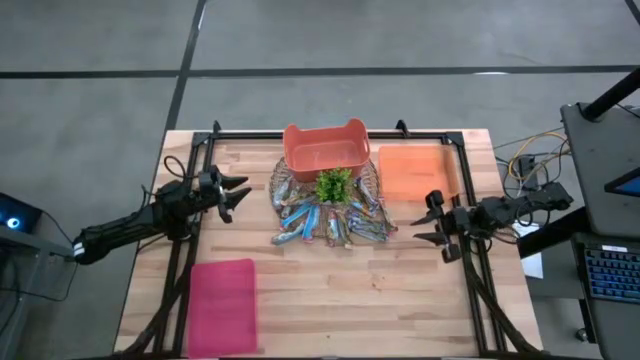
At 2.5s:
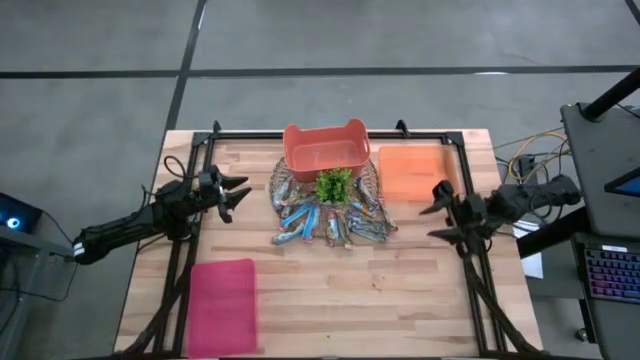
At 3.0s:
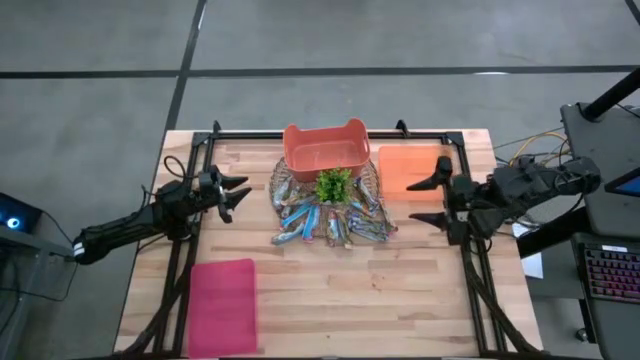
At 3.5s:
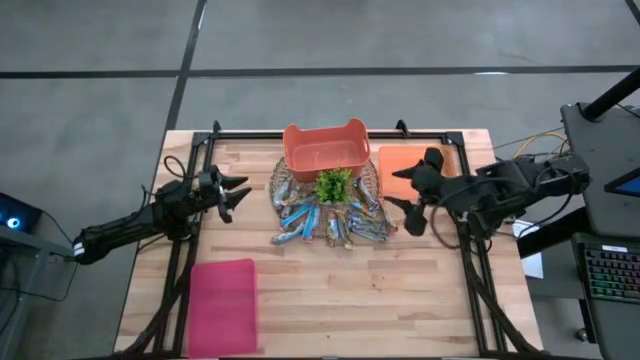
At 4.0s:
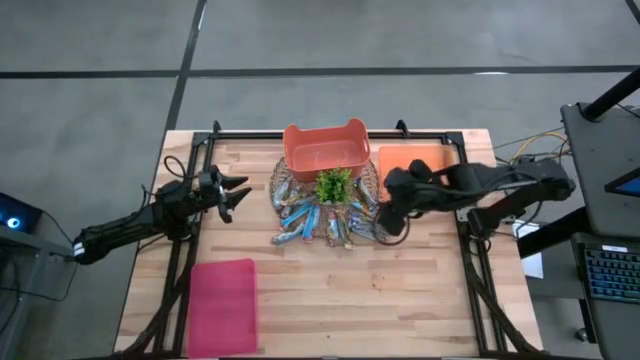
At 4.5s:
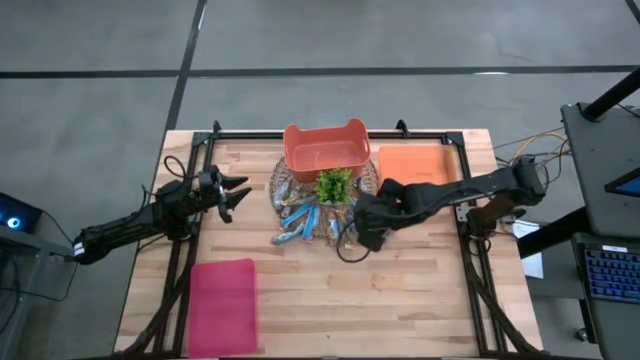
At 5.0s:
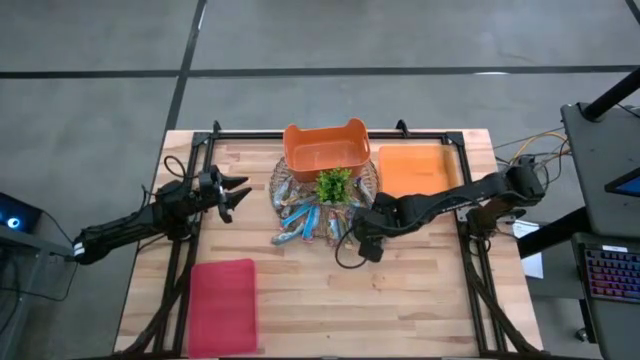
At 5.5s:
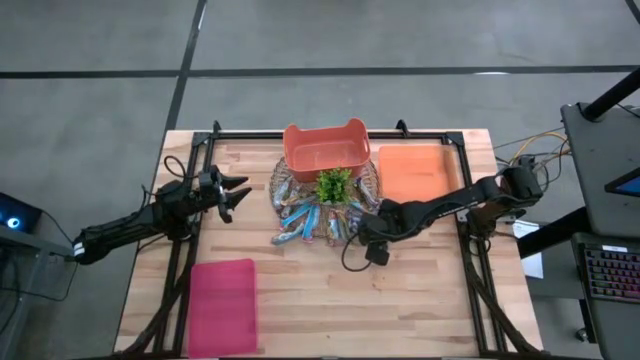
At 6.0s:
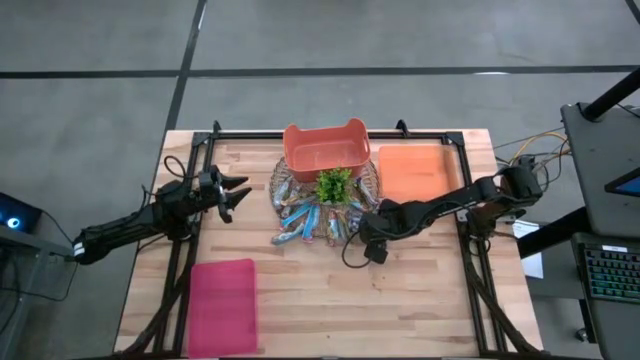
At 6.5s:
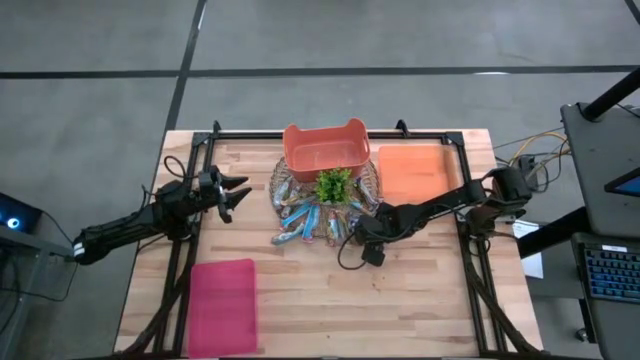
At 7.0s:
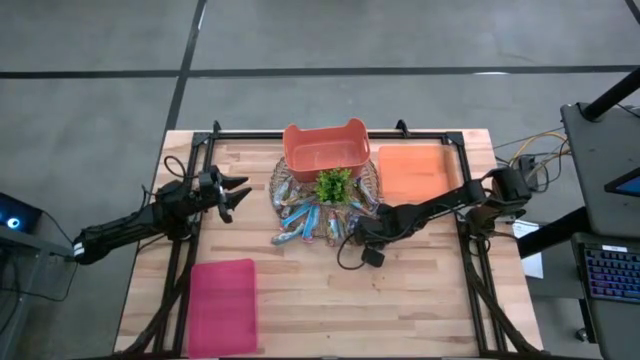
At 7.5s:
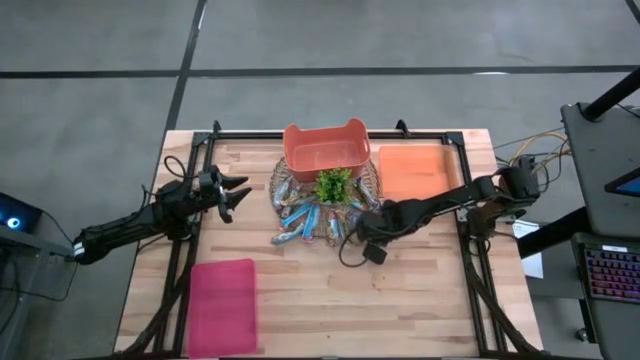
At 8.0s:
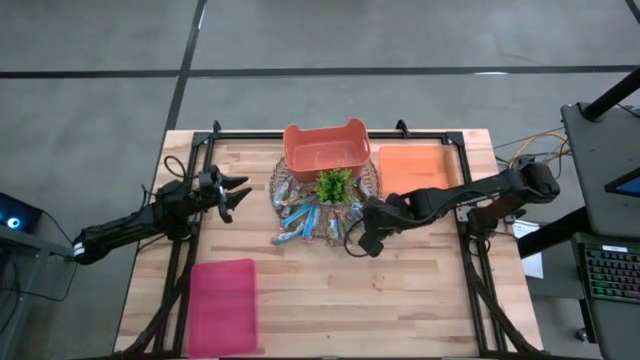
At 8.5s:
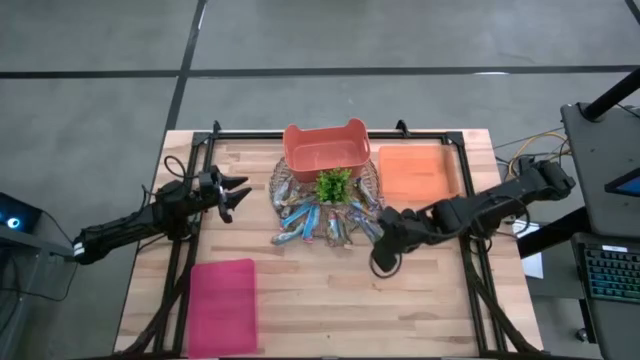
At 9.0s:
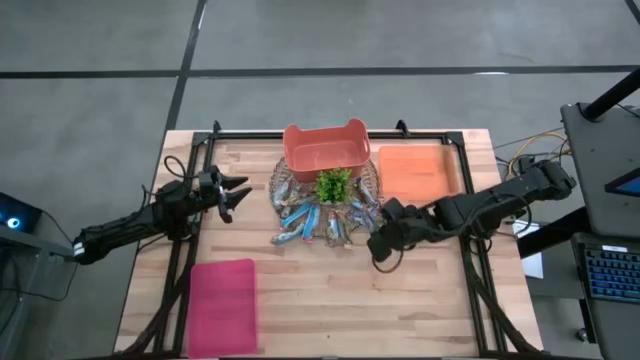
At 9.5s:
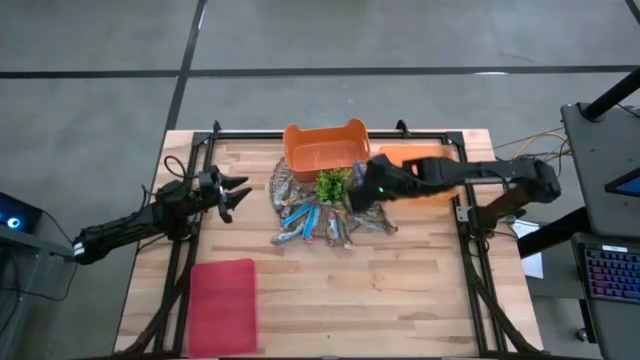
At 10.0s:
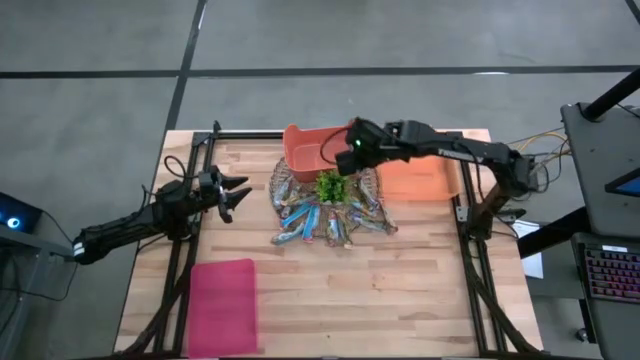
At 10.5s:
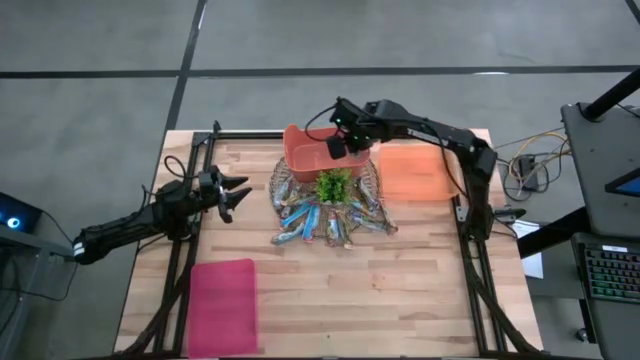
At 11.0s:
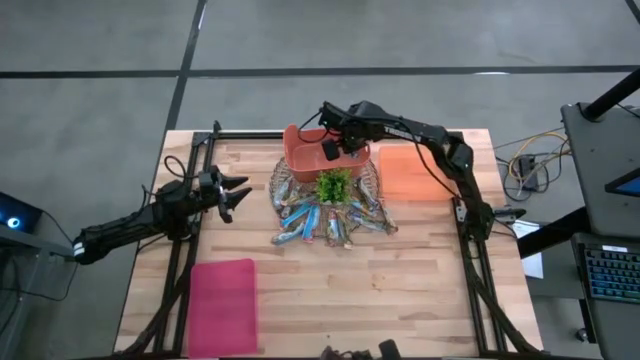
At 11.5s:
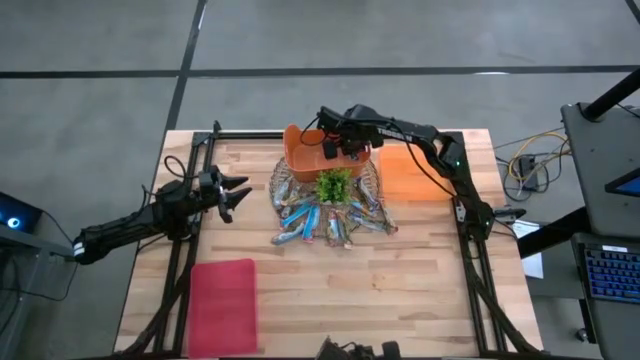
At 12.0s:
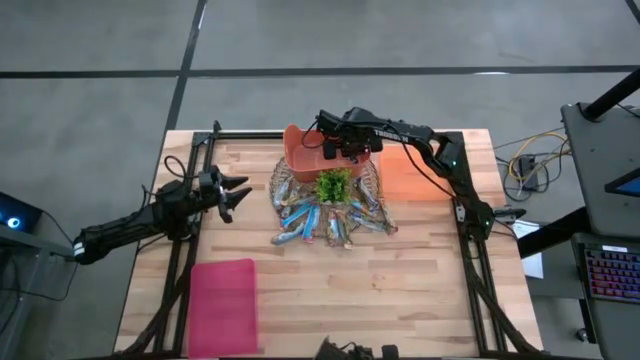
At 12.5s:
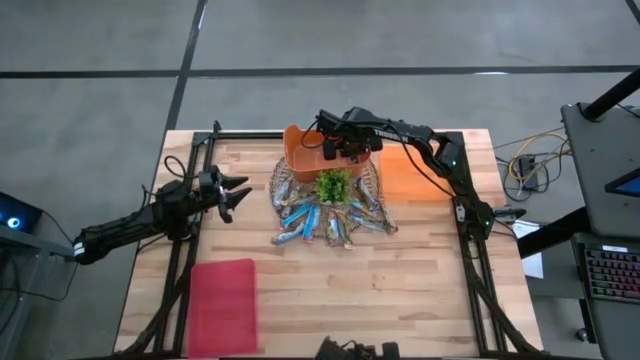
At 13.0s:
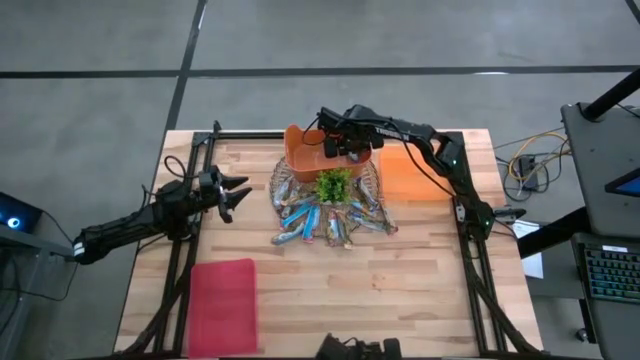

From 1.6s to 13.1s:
Task: Pick and place Granola Bars by type
Put the blue granola bar into the dark orange bin

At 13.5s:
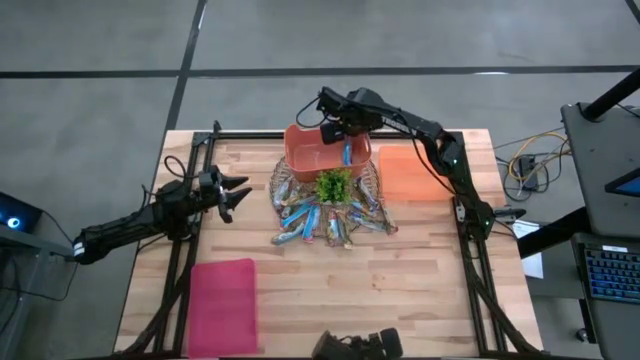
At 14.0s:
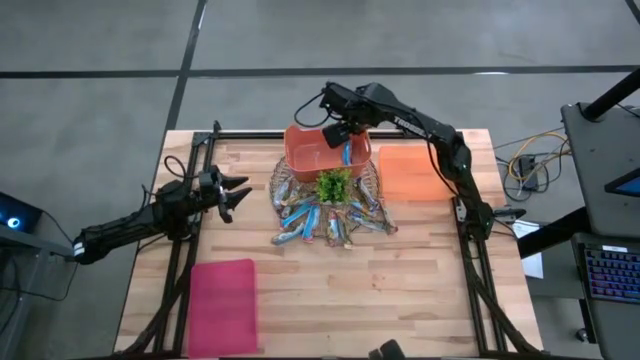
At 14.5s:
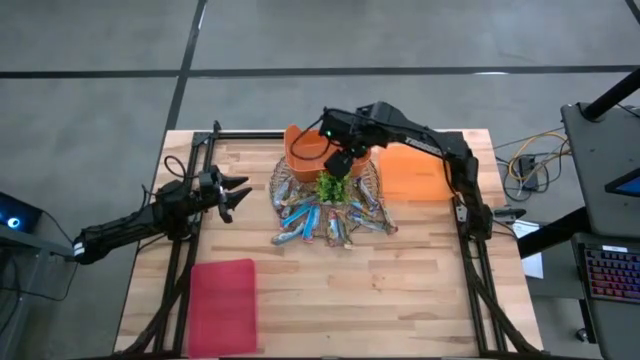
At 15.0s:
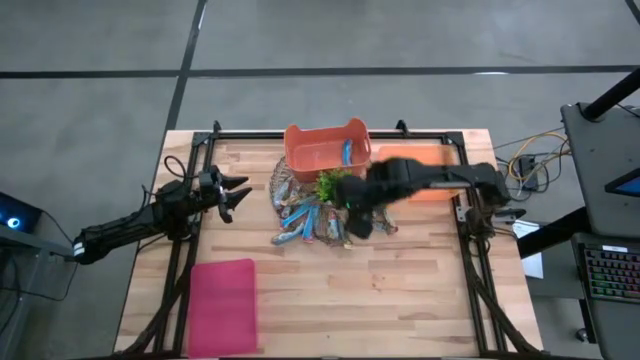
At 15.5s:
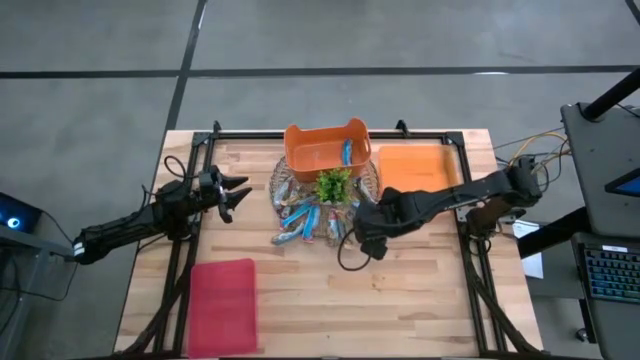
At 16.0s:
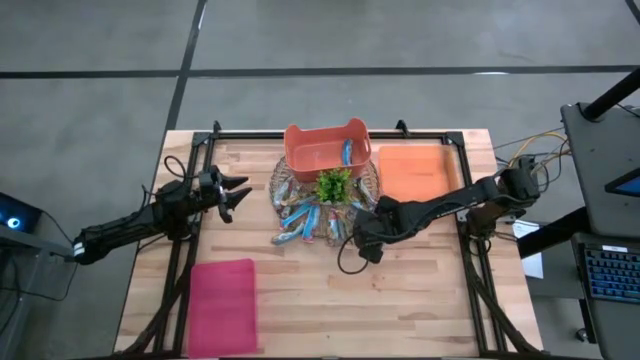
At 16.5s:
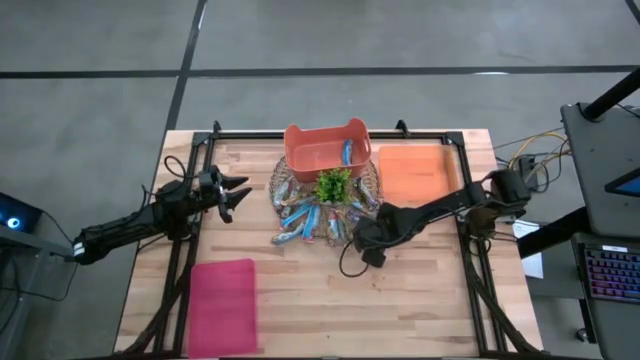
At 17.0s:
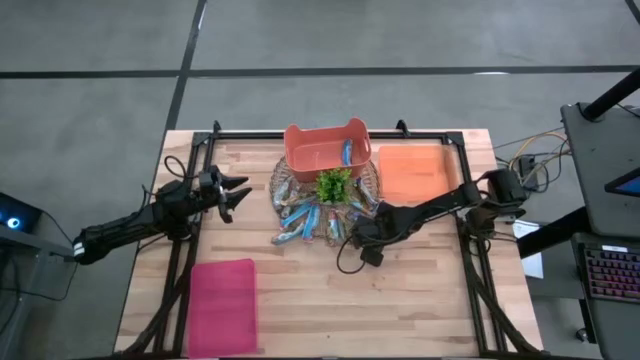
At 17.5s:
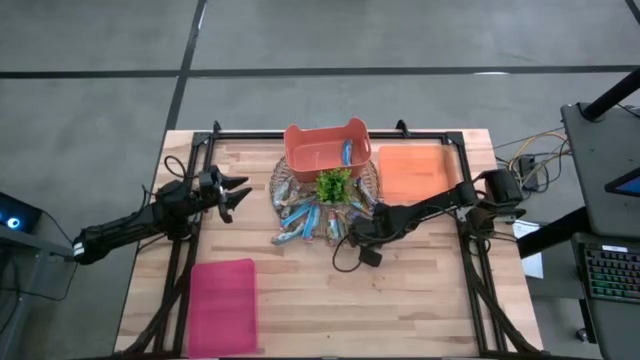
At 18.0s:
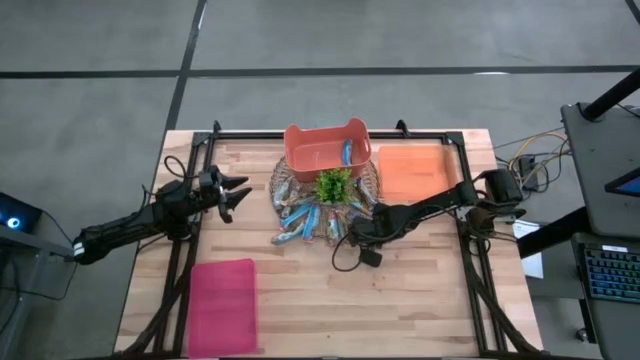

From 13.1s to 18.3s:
Put the blue granola bar into the dark orange bin

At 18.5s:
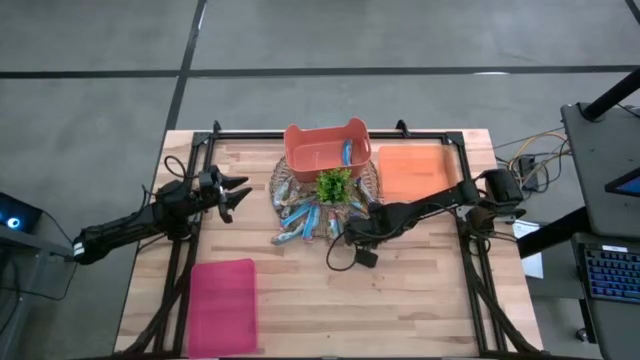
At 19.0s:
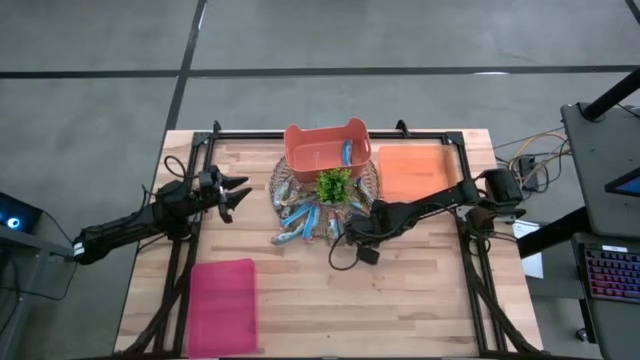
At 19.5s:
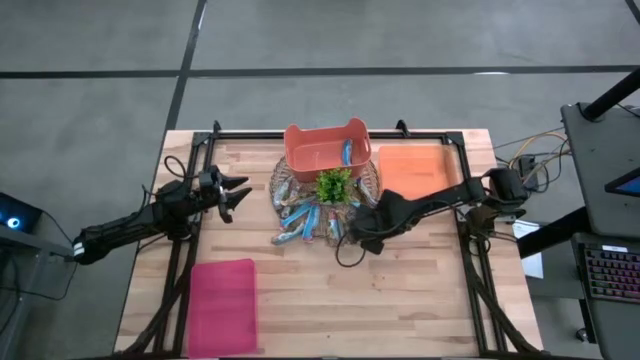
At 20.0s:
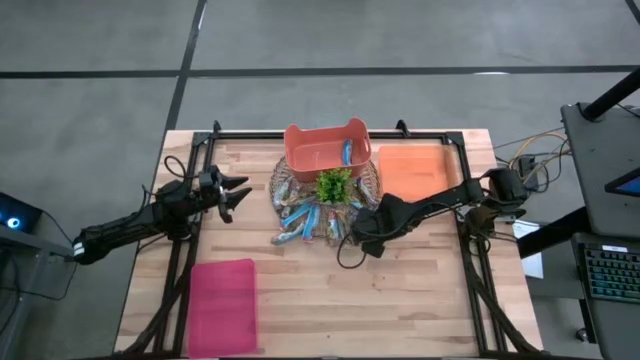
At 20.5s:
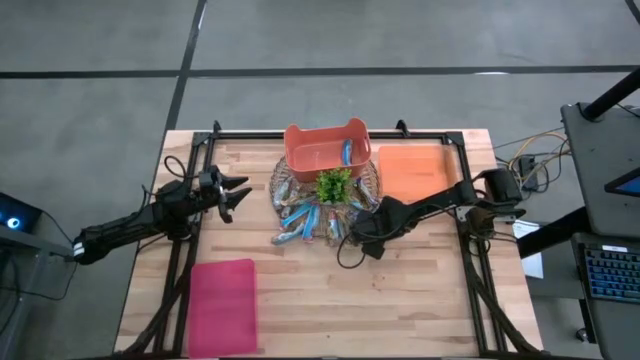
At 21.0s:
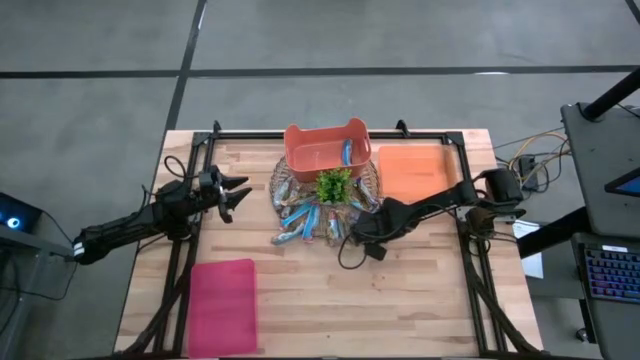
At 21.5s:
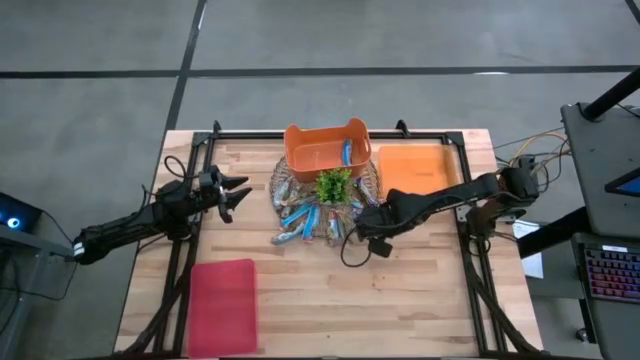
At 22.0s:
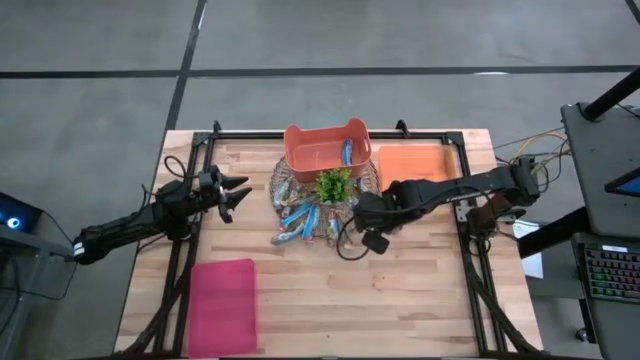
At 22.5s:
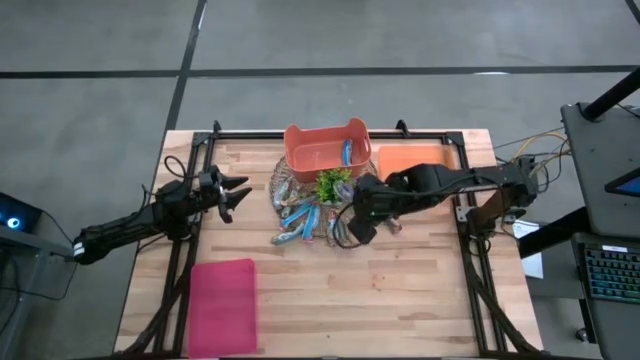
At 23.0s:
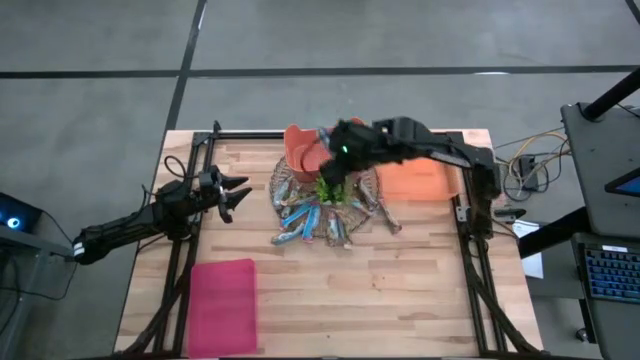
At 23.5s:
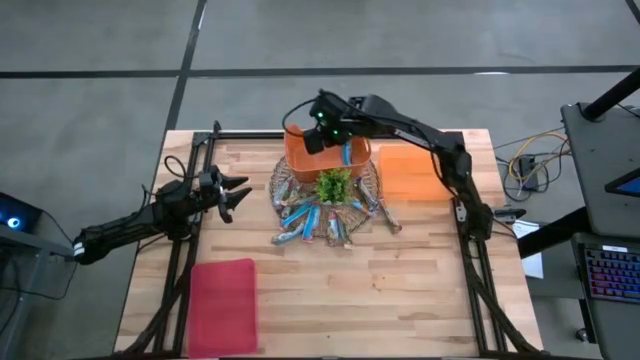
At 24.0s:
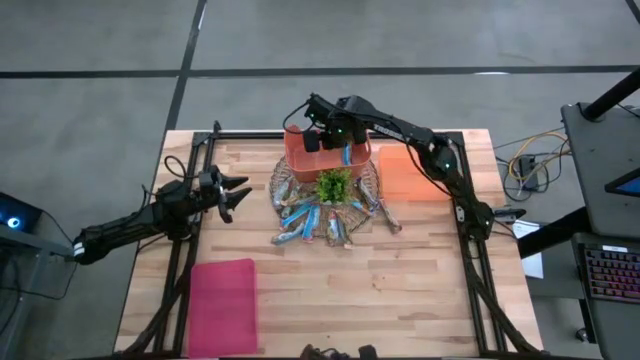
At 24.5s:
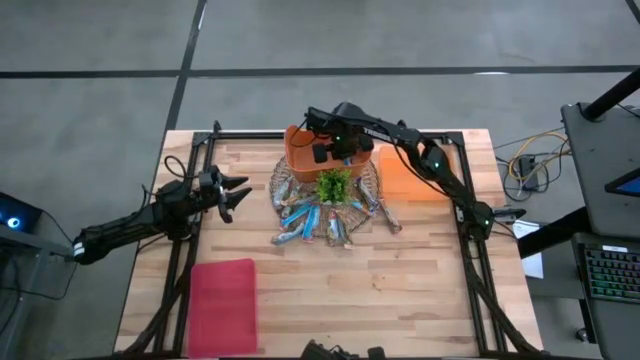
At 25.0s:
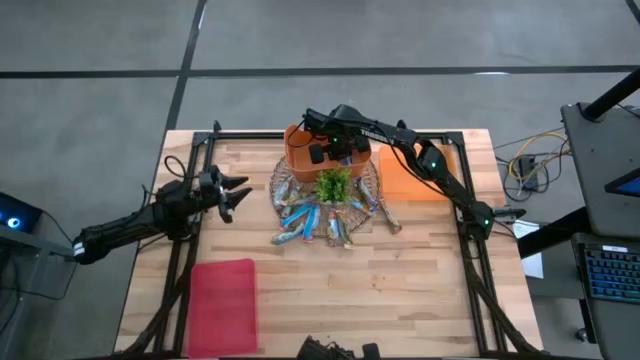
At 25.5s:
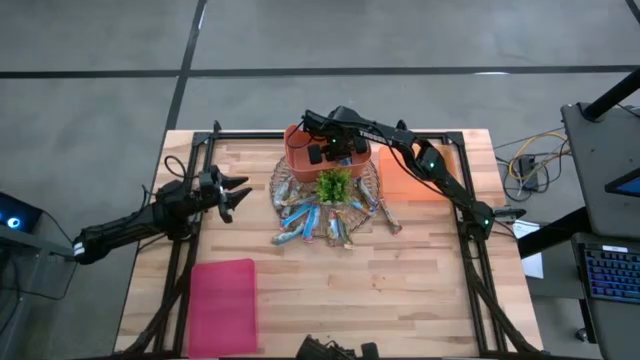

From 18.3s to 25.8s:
Put the blue granola bar into the dark orange bin
